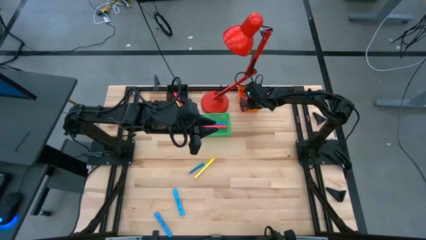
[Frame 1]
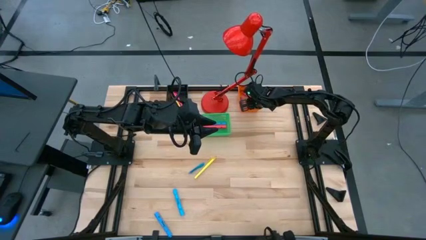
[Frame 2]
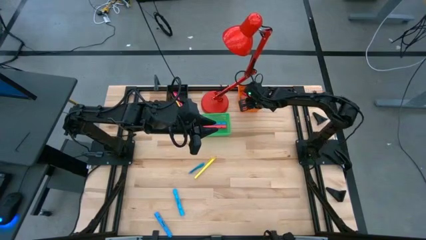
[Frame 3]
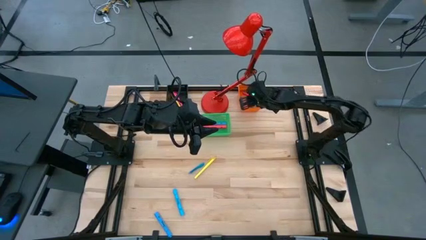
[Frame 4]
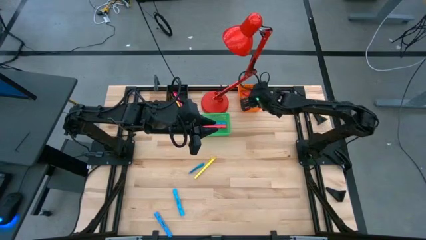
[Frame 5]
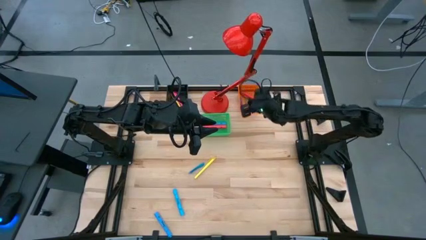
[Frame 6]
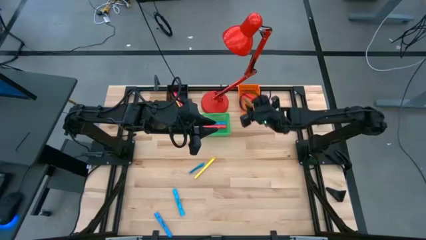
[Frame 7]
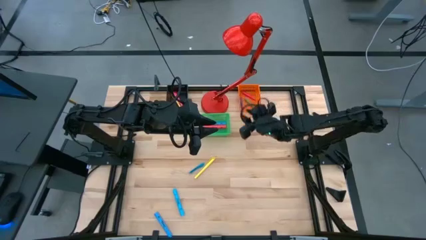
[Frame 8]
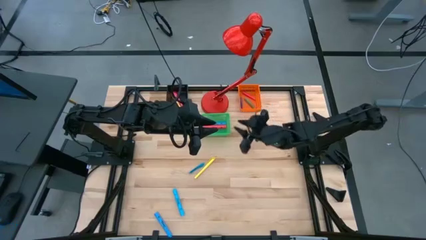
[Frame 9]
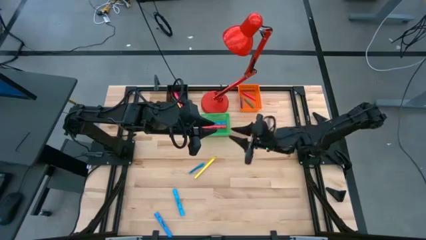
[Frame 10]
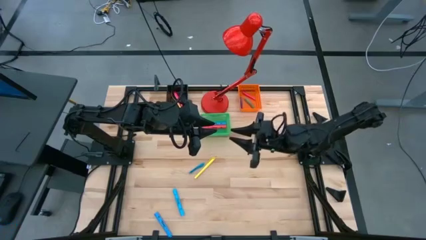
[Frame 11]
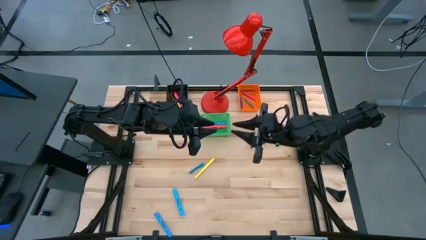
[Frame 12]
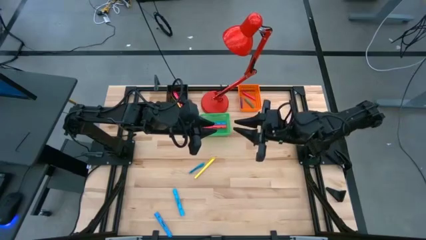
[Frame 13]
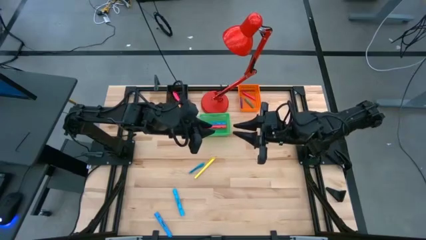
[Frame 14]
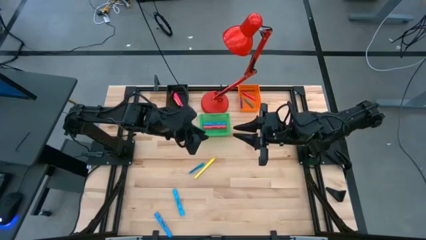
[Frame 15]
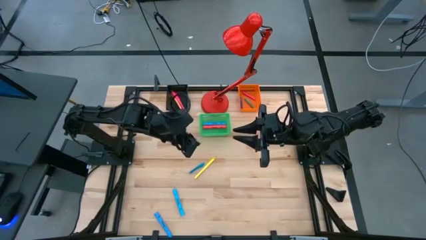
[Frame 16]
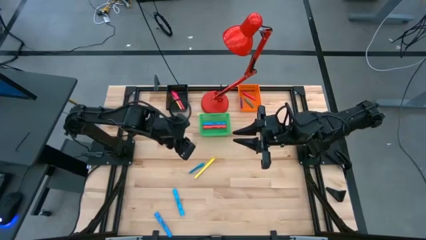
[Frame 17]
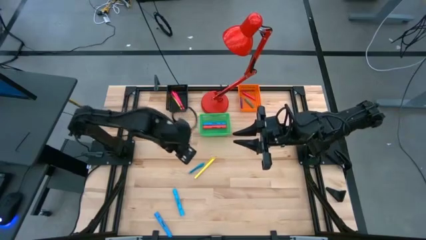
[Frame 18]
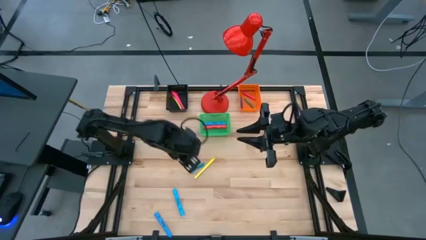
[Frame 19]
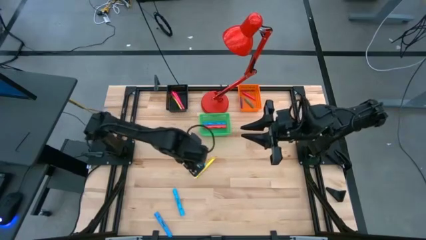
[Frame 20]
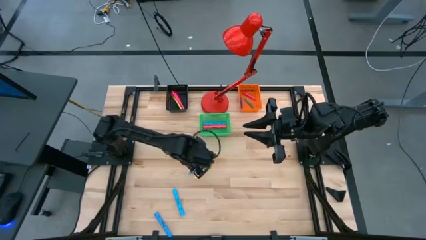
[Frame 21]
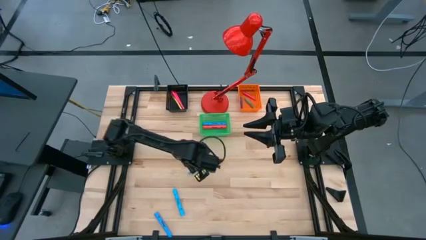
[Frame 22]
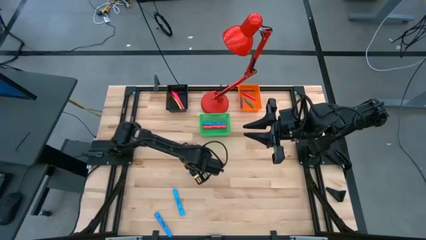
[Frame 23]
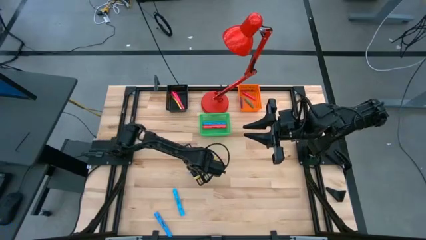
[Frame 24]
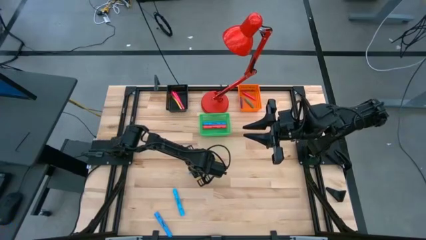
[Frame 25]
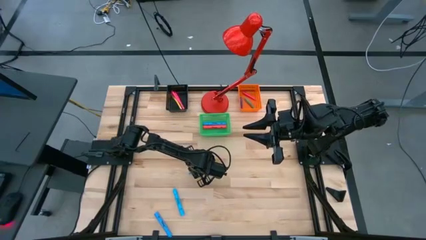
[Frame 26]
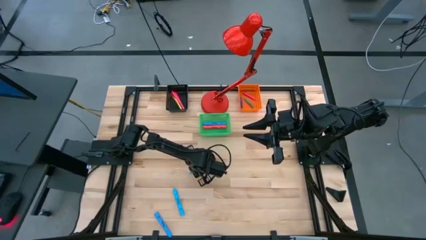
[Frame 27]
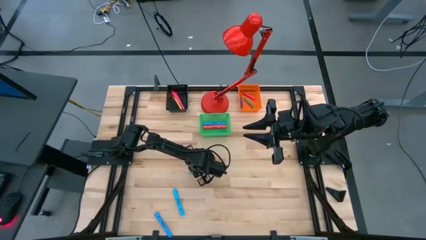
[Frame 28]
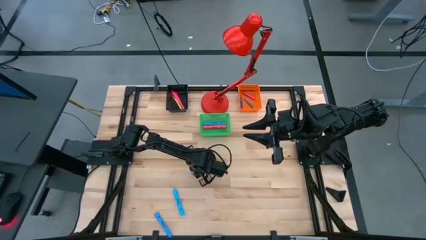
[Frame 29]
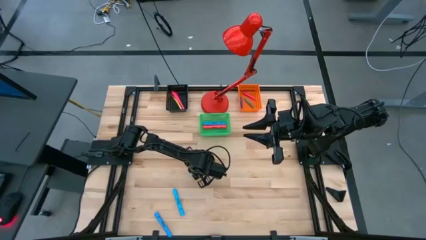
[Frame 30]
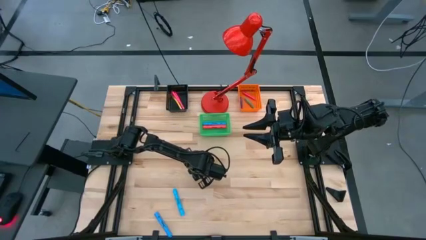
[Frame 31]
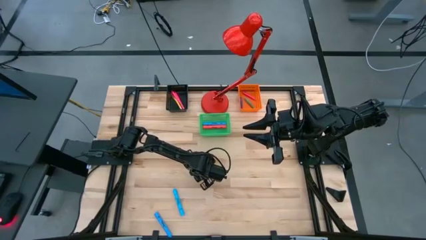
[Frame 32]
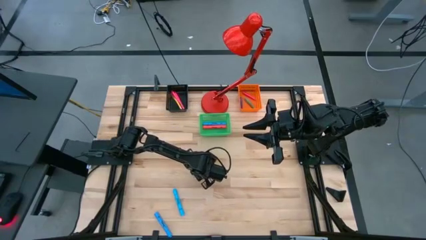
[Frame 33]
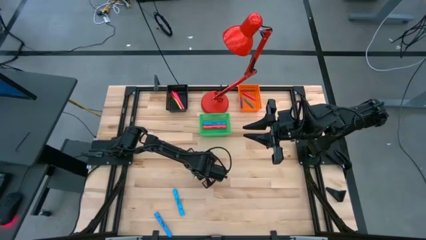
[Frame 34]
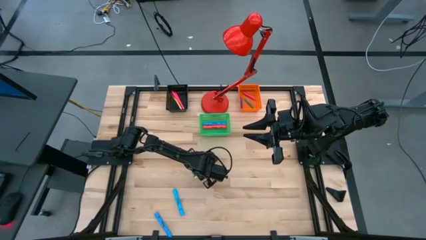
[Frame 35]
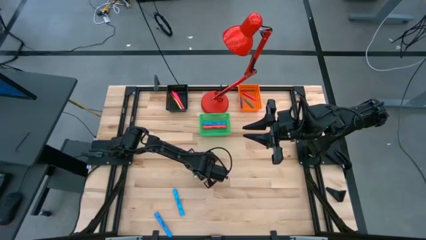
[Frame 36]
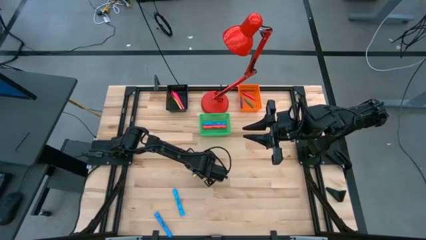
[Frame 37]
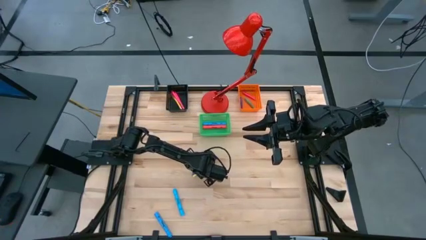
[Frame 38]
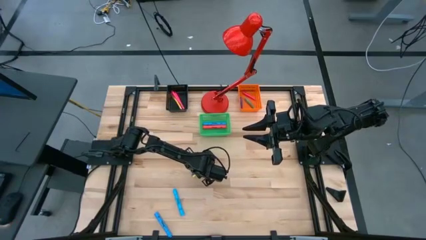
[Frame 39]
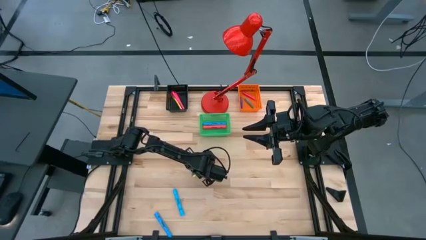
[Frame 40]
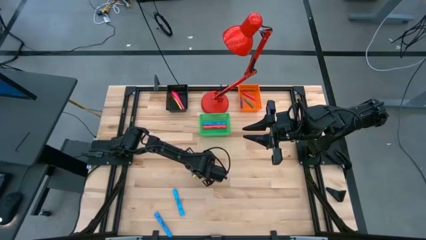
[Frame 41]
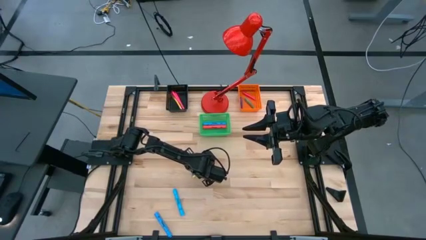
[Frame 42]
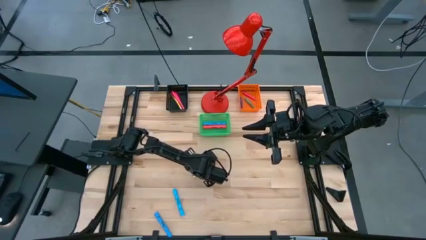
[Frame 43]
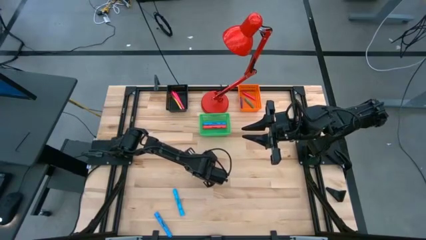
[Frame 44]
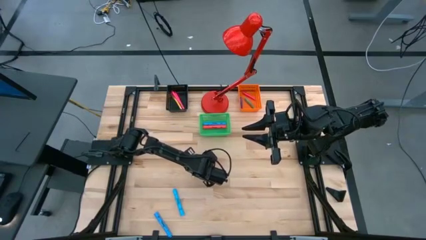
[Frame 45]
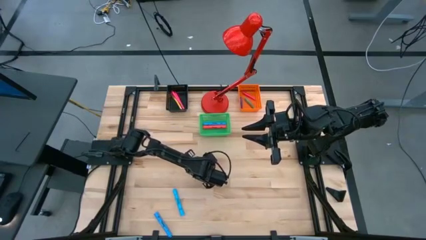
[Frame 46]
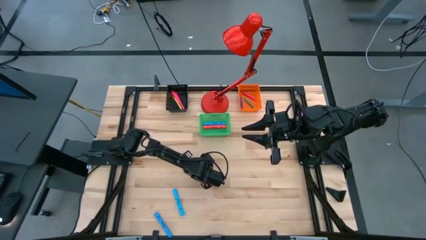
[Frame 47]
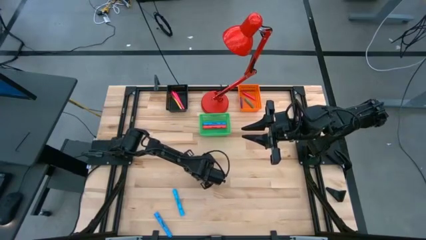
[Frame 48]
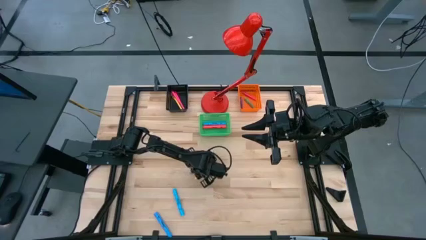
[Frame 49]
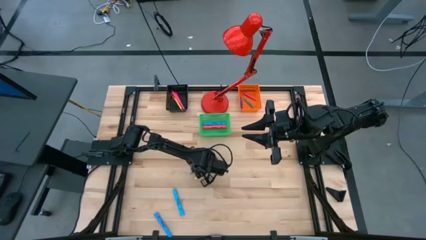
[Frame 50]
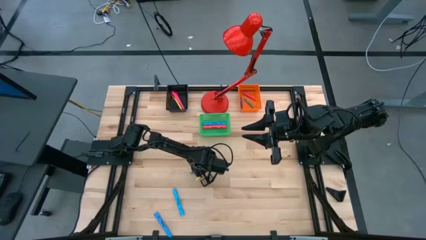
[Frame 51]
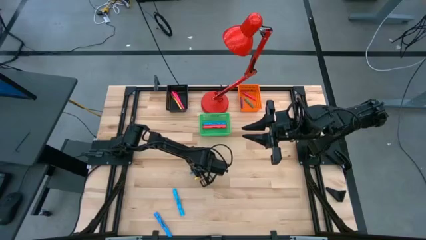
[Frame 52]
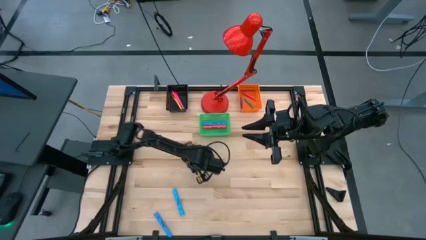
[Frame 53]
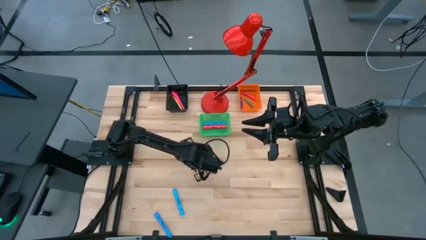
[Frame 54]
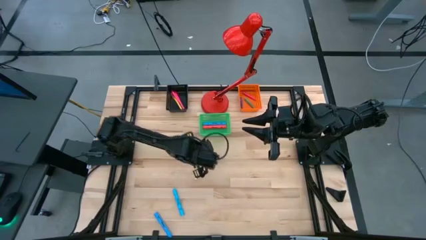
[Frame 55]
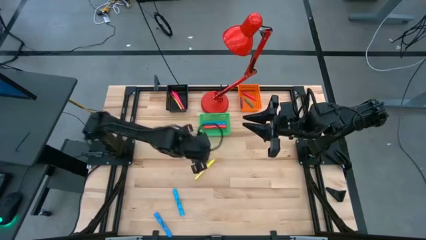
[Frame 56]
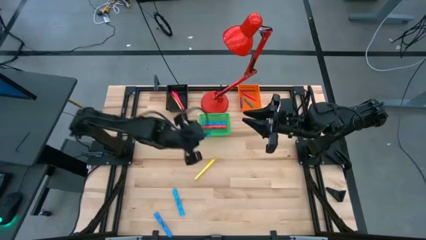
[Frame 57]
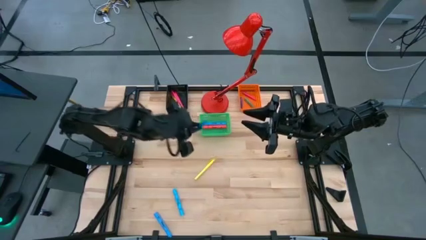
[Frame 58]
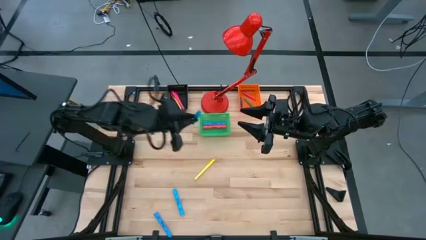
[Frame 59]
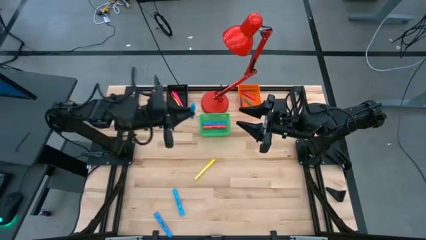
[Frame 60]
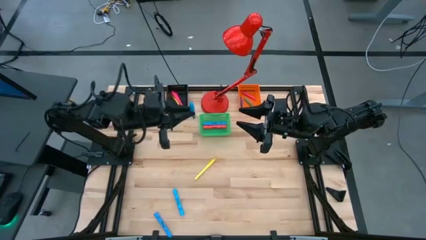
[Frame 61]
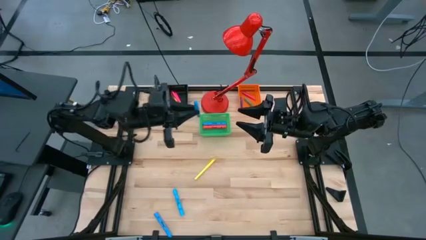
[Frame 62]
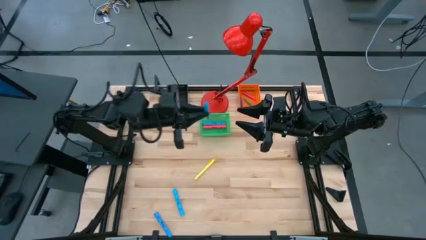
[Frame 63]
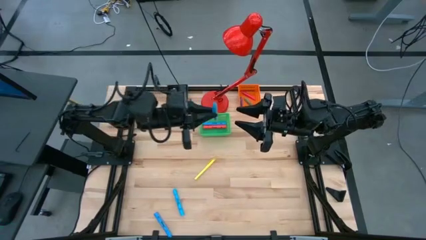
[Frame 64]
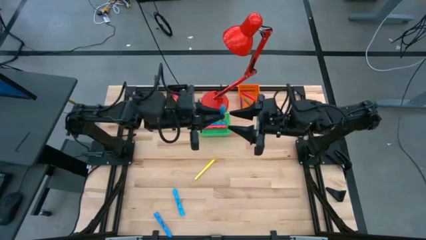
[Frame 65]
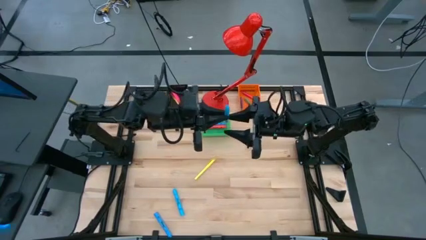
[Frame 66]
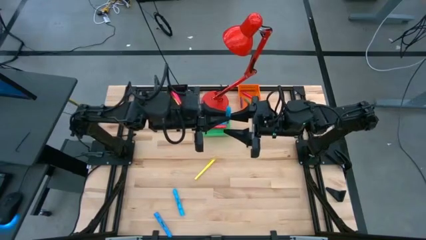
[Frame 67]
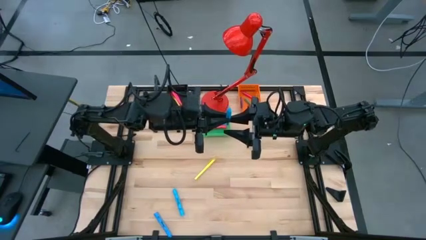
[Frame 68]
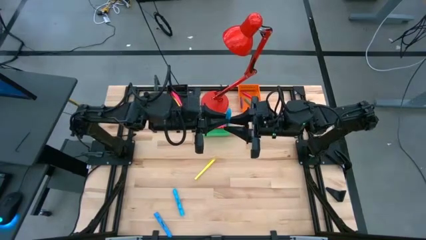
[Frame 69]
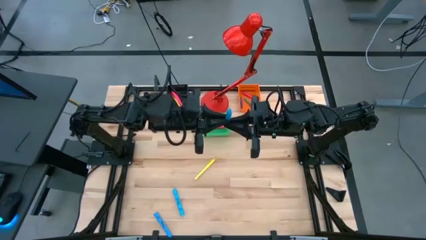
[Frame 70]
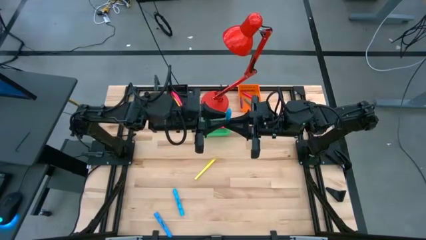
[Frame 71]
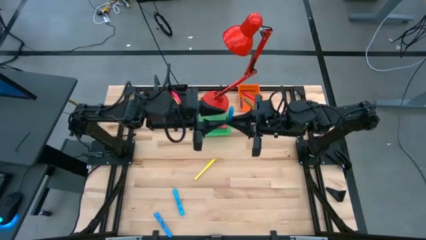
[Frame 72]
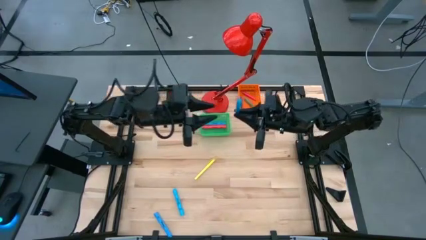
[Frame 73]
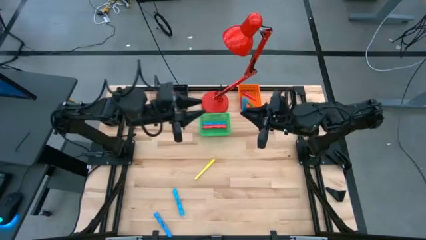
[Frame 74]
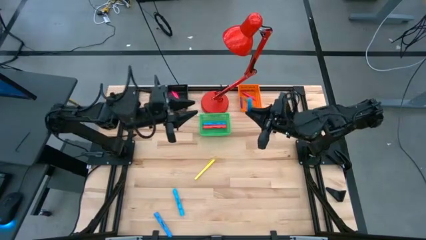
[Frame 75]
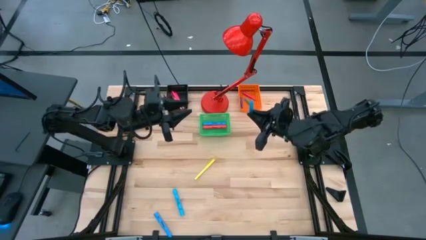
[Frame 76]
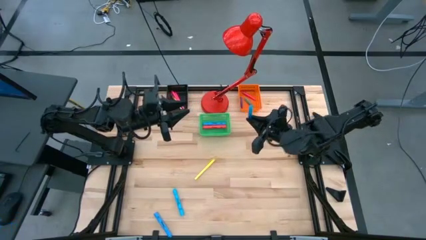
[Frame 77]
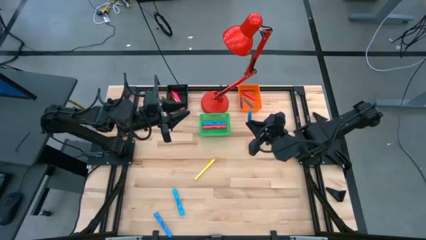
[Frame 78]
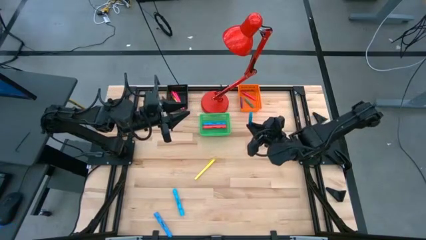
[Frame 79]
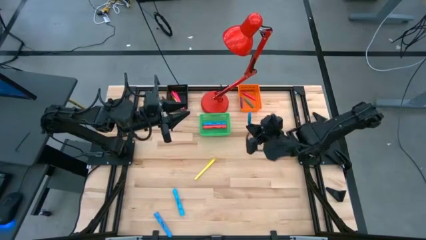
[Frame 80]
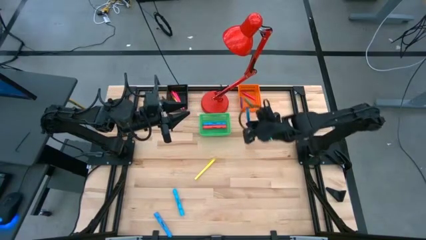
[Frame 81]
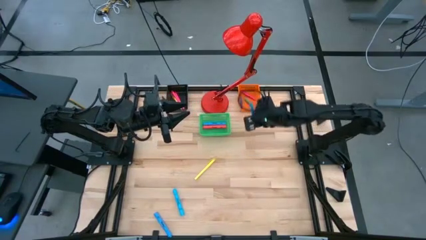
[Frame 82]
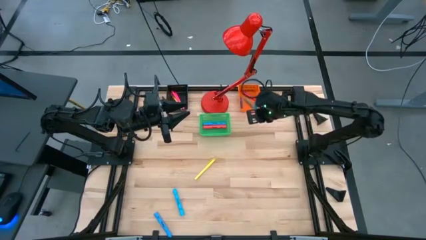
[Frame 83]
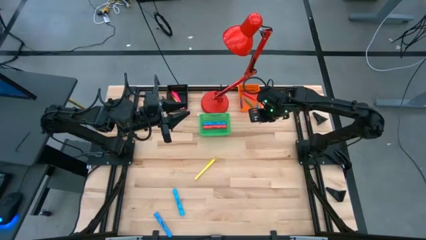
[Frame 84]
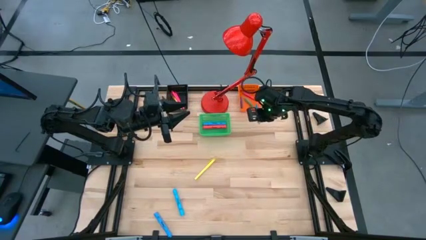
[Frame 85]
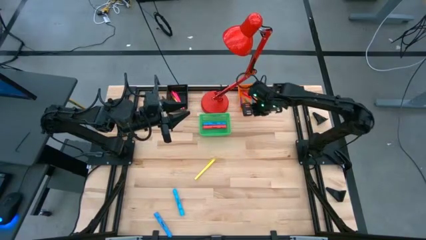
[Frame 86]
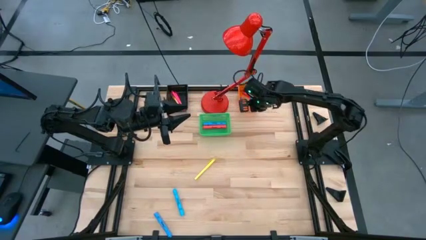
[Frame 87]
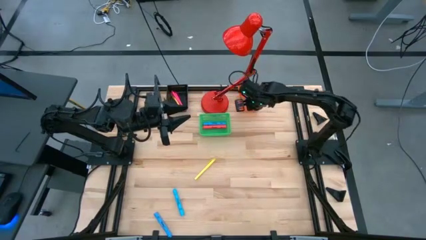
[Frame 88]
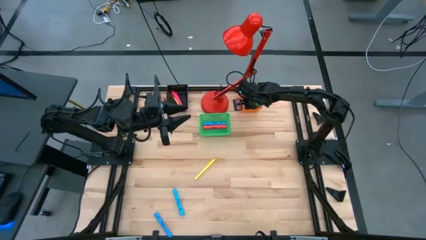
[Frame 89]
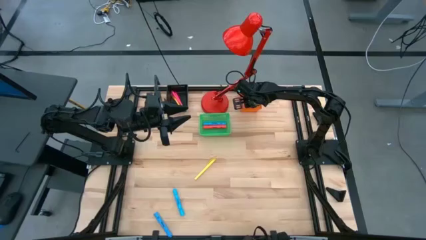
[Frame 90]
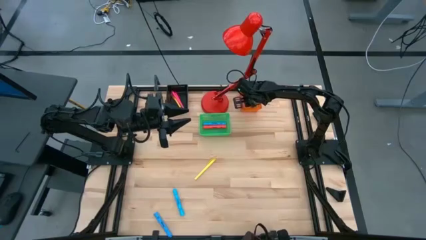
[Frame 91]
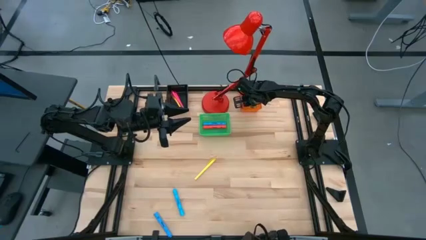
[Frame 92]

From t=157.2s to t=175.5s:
Task: Pick & Place Markers
Put the small blue highlighter into the orange basket
